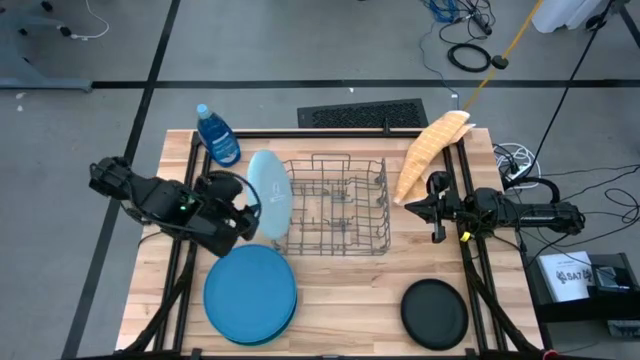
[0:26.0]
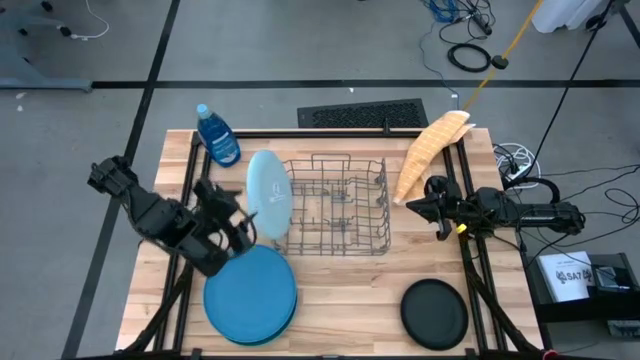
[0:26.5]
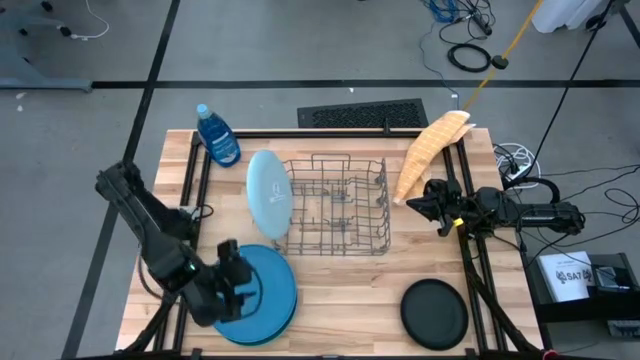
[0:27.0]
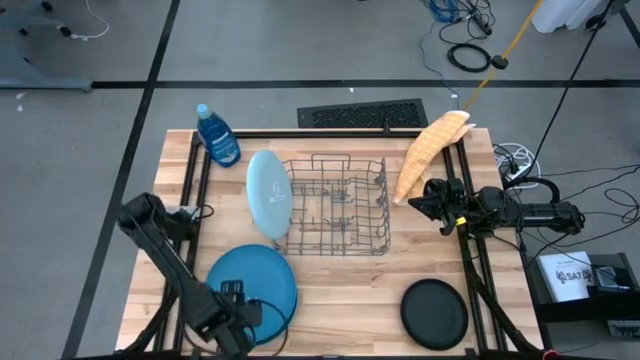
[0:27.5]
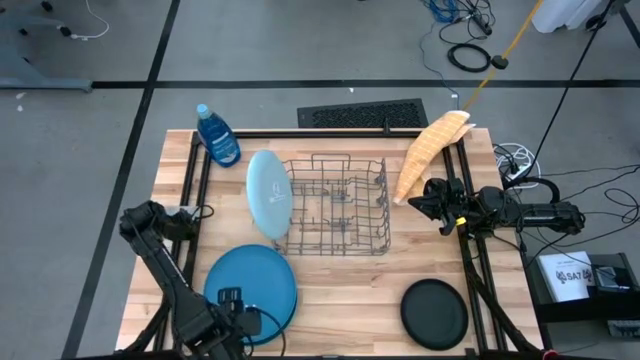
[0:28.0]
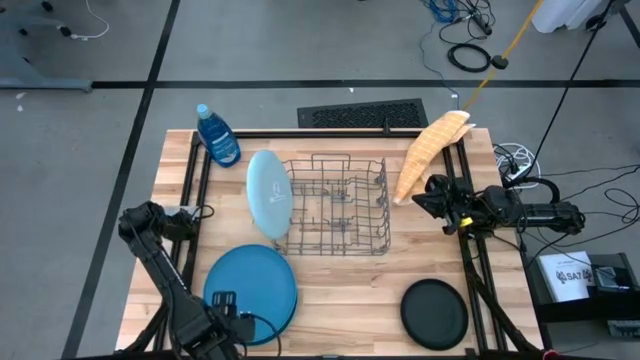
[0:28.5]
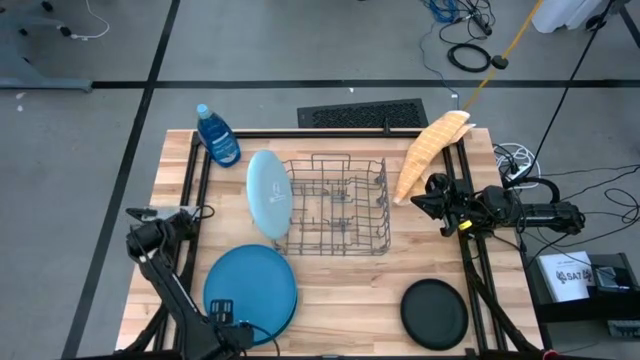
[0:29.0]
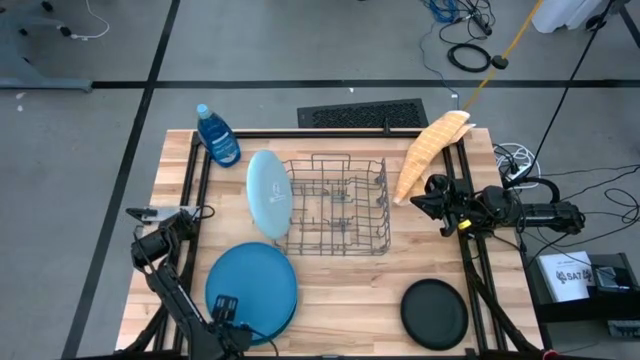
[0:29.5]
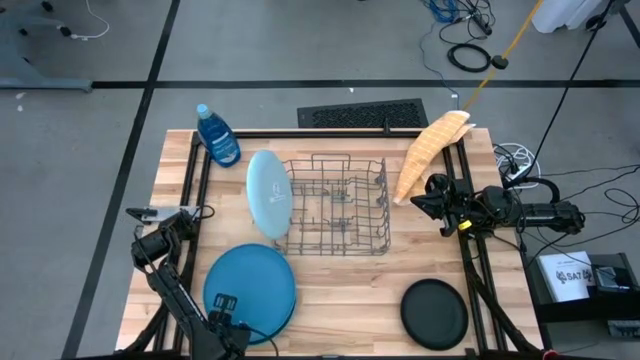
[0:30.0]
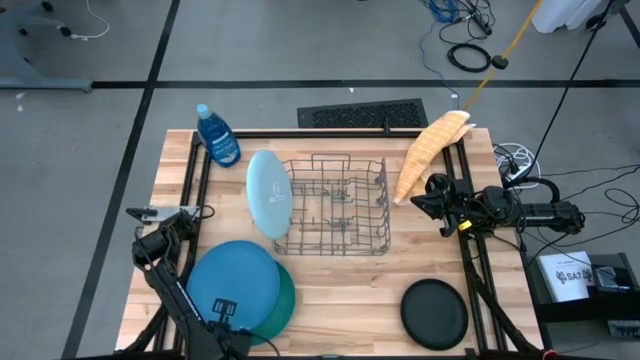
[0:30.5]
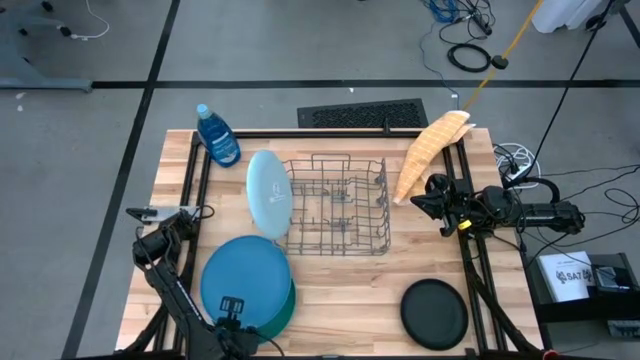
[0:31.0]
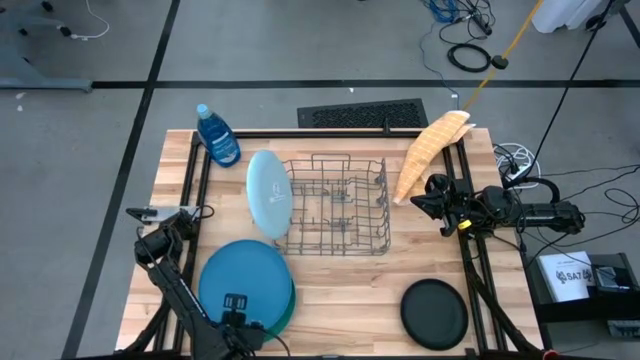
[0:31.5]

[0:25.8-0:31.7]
Task: Sort dishes
Put the blue plate into the dish rack

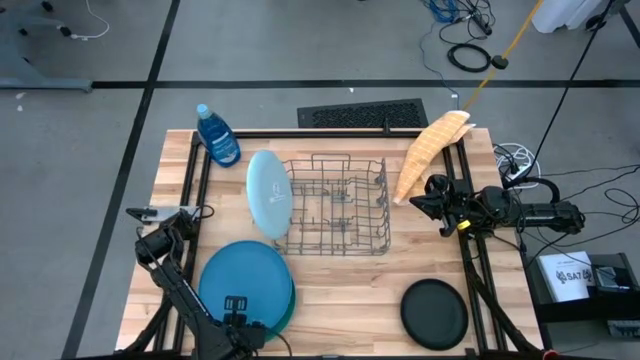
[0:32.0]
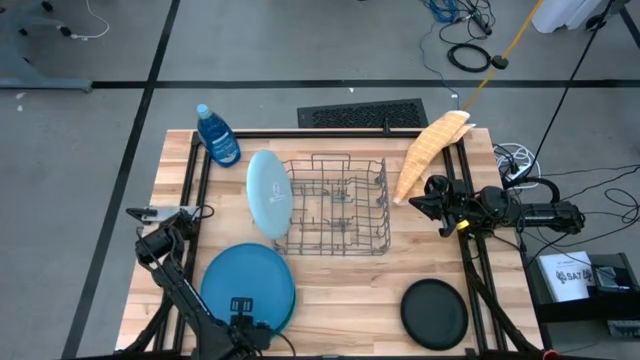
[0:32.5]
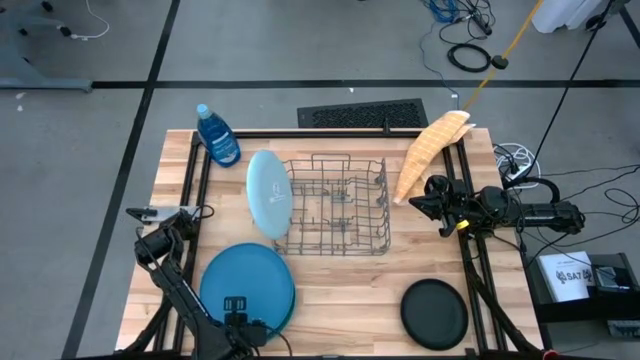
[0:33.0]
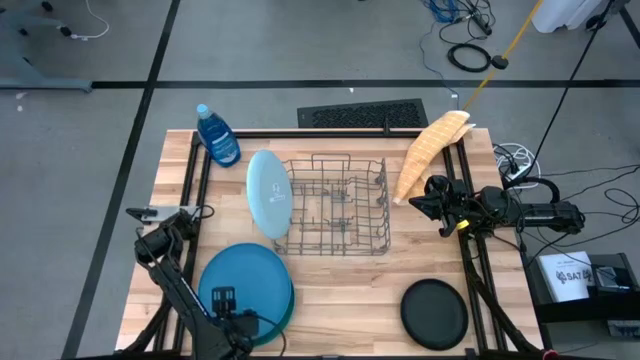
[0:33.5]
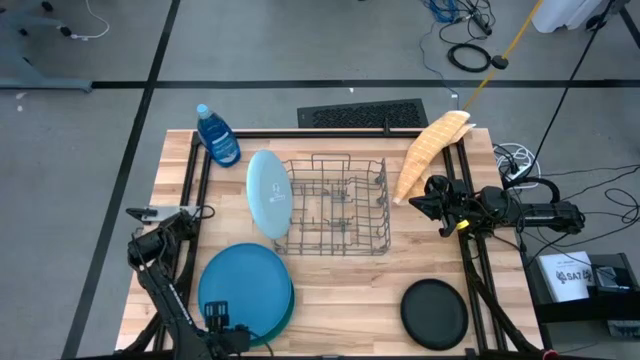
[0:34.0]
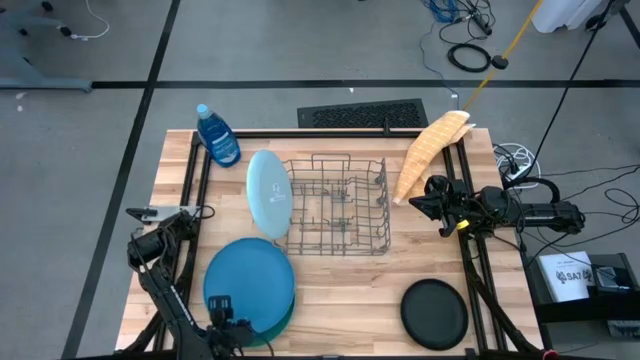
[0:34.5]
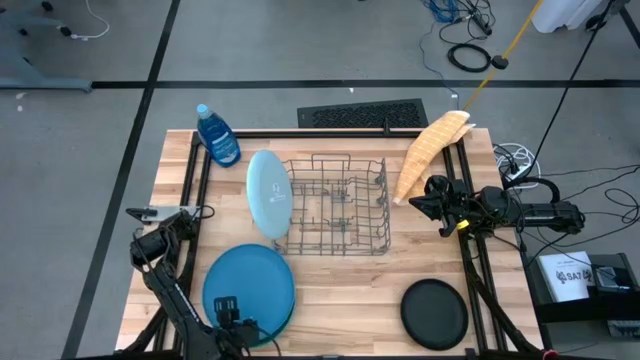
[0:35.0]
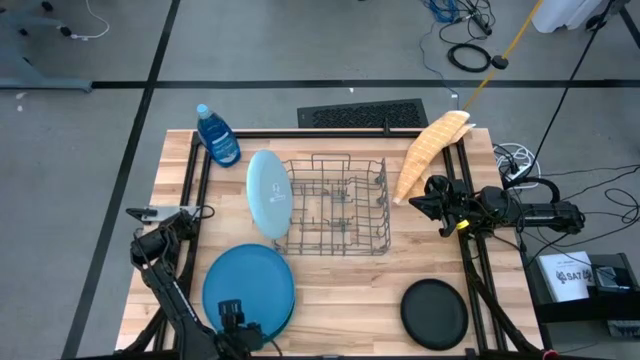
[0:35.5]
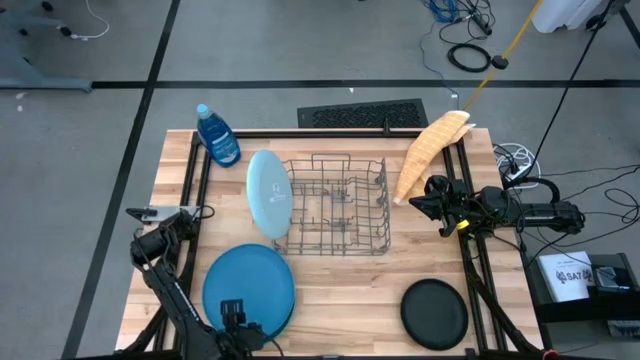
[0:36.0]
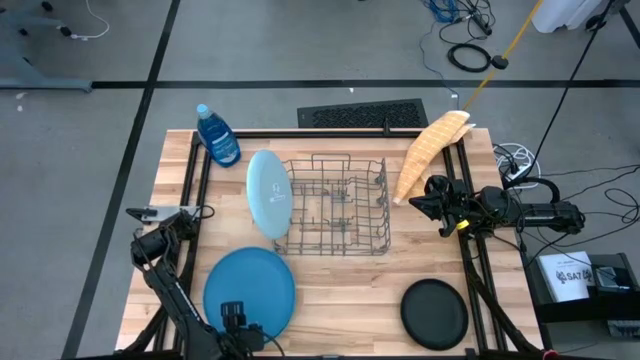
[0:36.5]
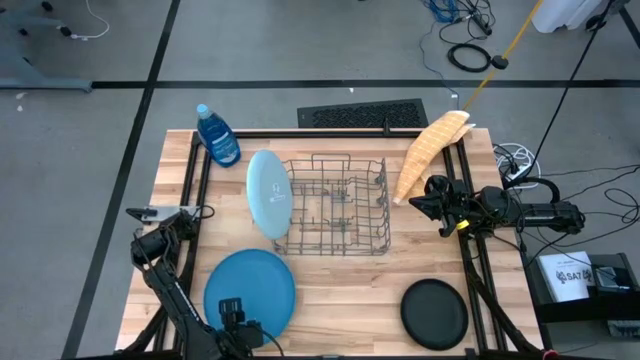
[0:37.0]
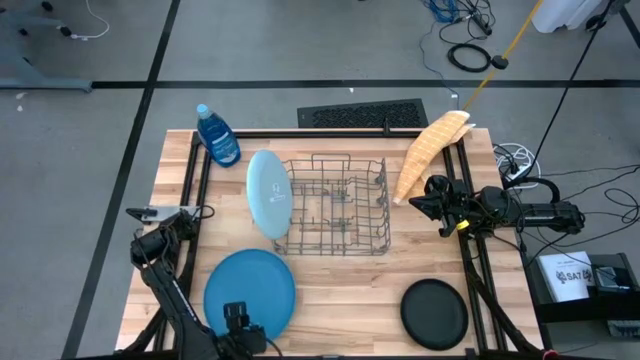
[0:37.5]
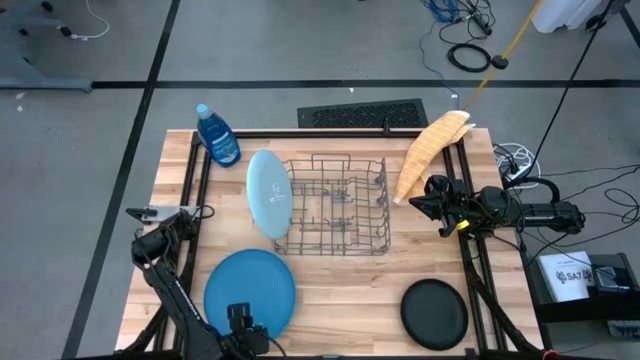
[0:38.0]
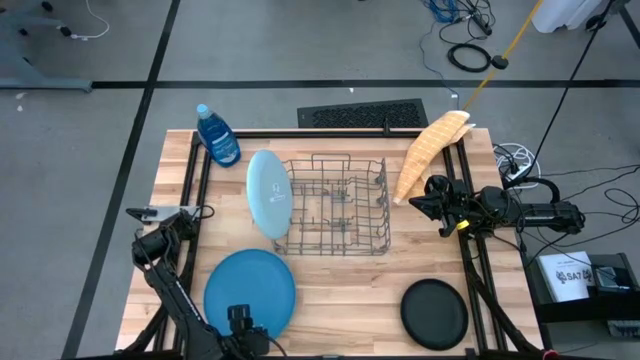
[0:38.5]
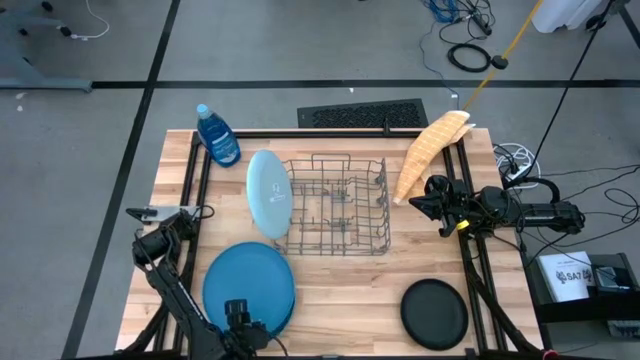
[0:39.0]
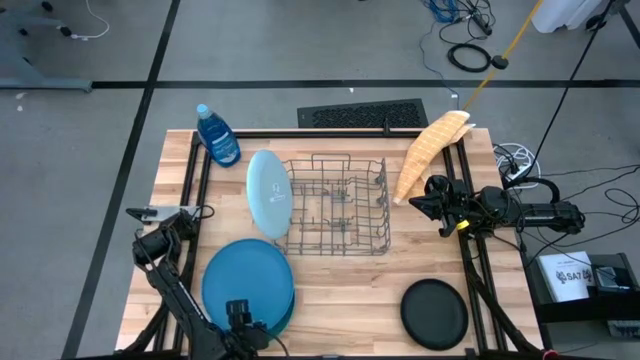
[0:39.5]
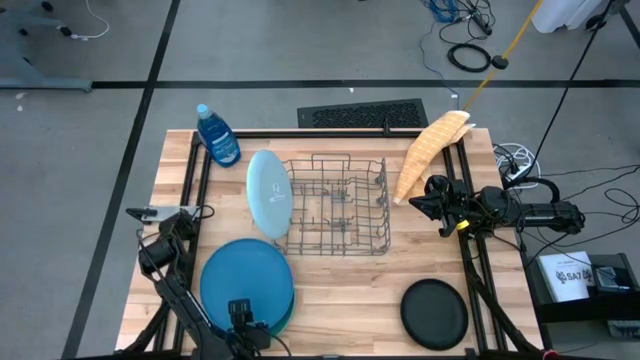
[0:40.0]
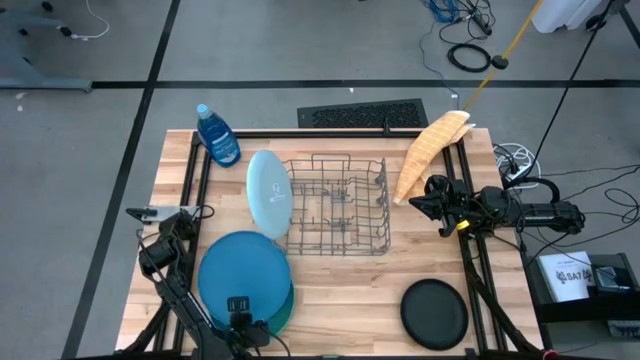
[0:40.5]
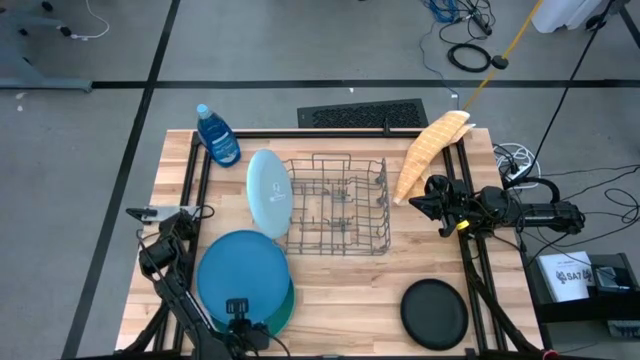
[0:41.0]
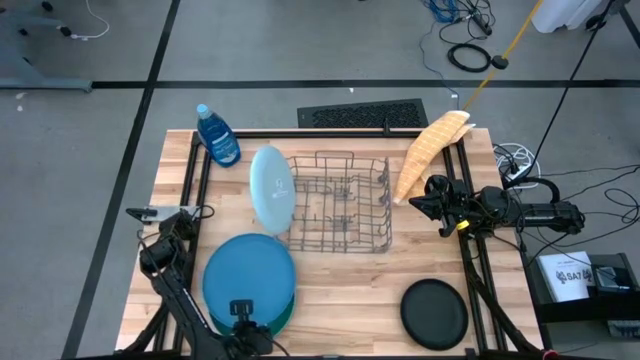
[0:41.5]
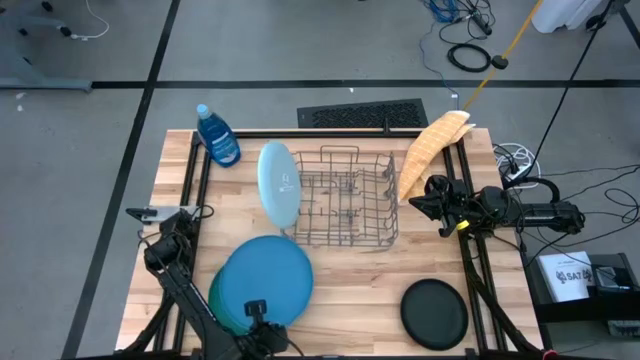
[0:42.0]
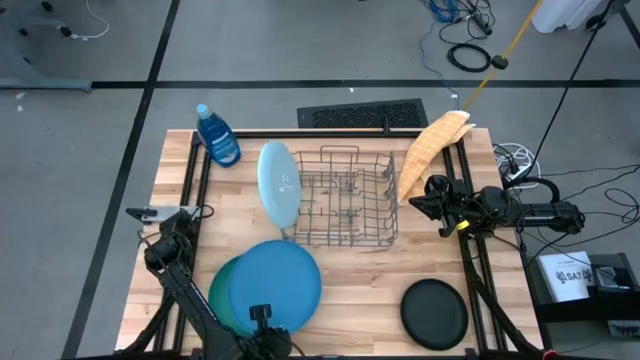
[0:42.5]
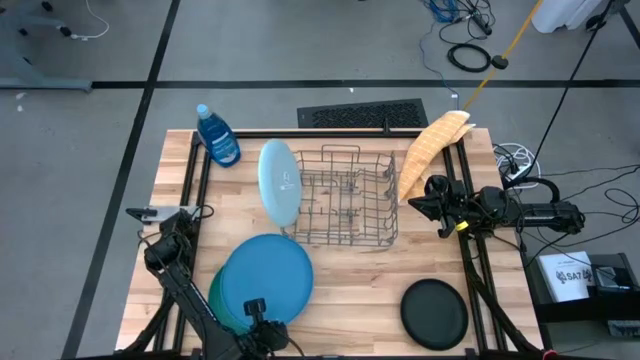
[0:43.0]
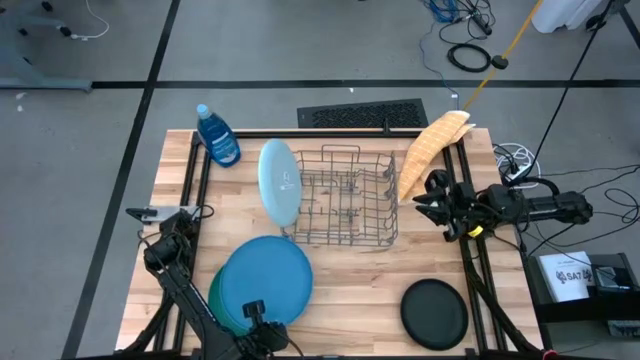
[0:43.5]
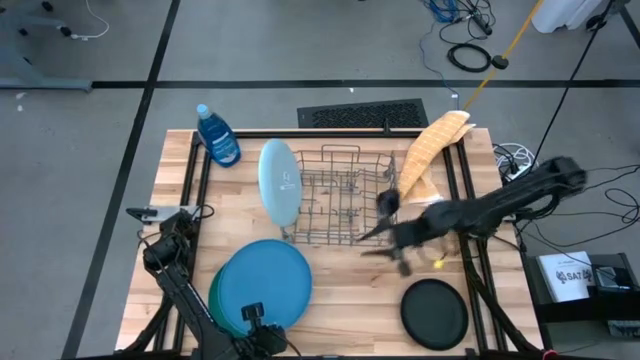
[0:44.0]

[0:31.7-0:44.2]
Put the blue plate into the dish rack

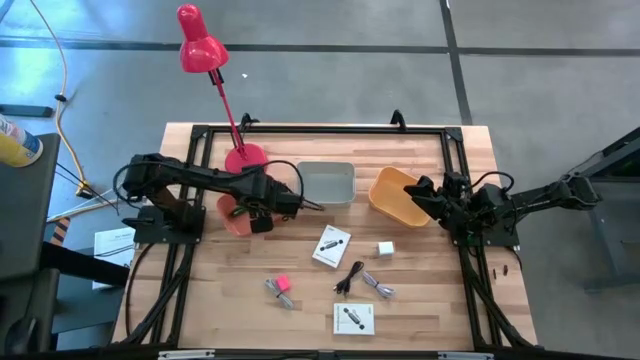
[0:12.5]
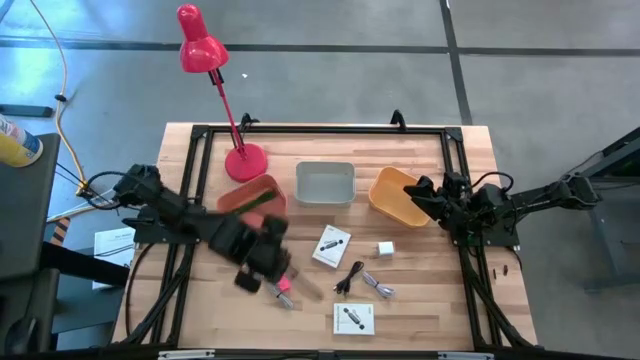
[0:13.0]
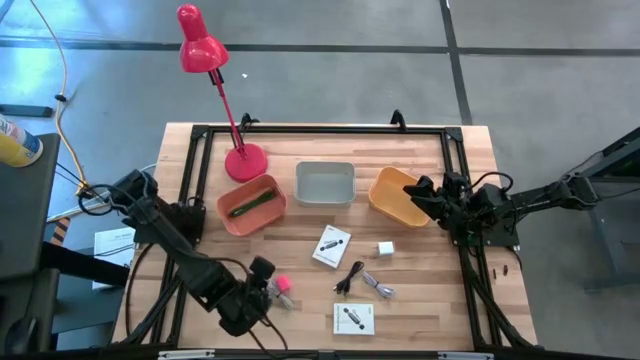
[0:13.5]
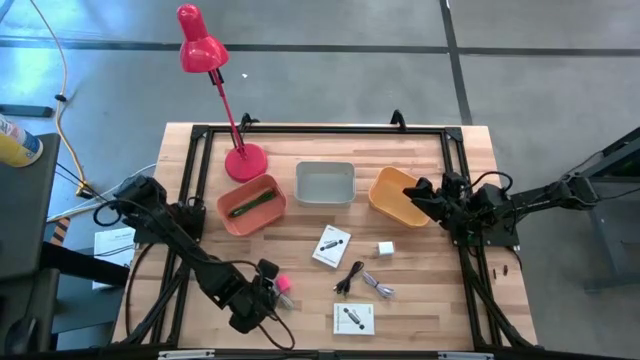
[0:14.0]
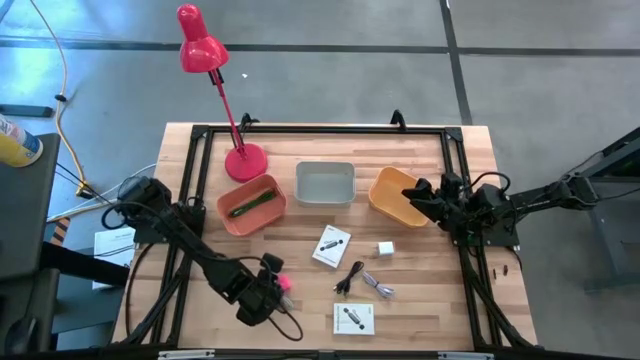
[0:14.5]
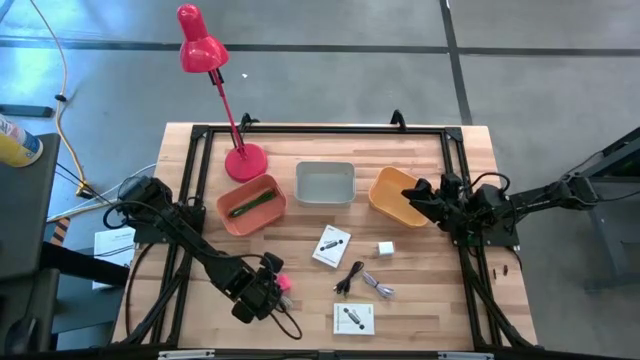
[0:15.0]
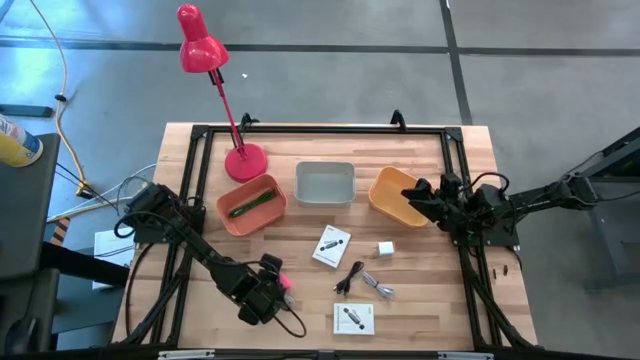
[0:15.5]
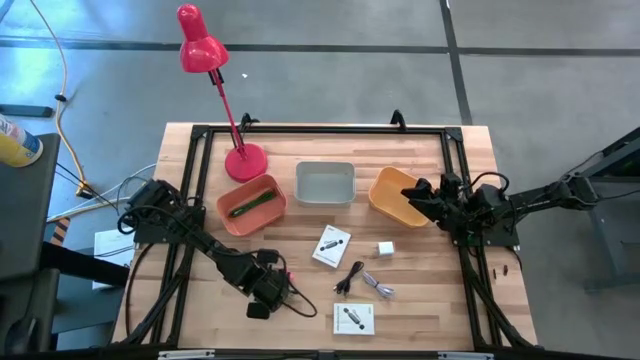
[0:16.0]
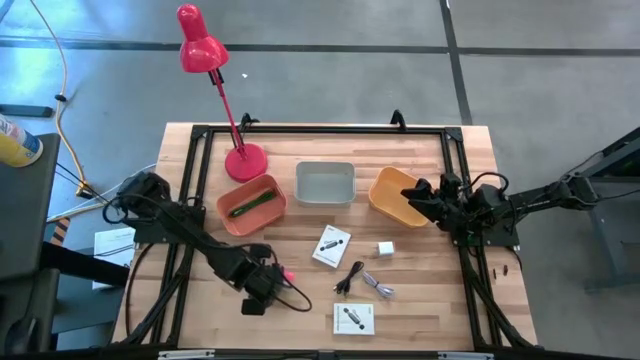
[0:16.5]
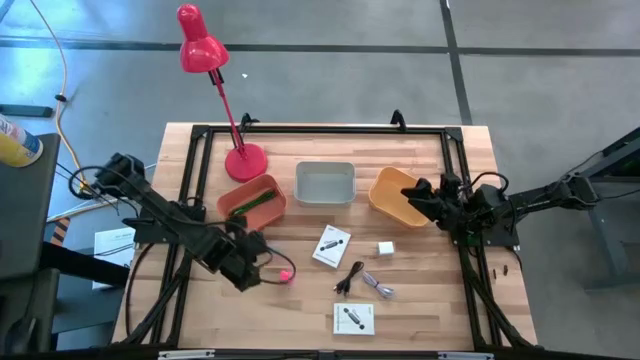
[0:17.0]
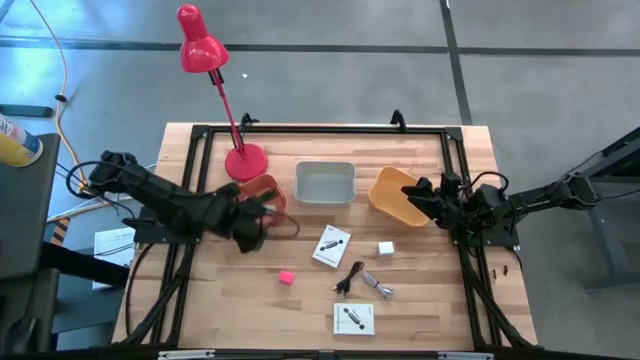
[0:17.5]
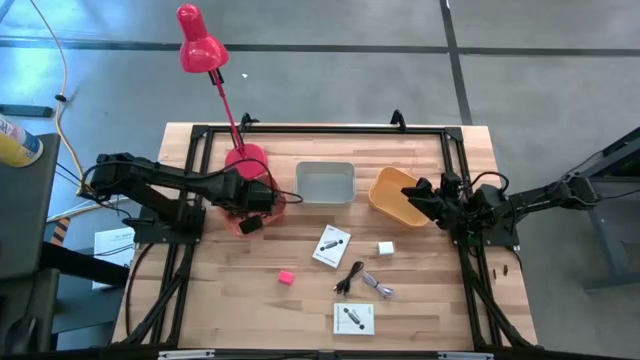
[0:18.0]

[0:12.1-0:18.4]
Task: Pick and place items into bin
Put the white charger cable into the dark brown bin
